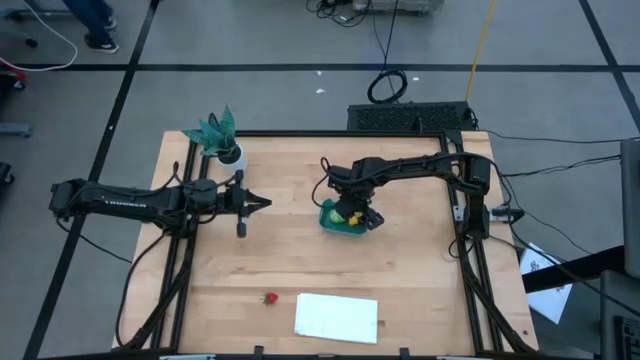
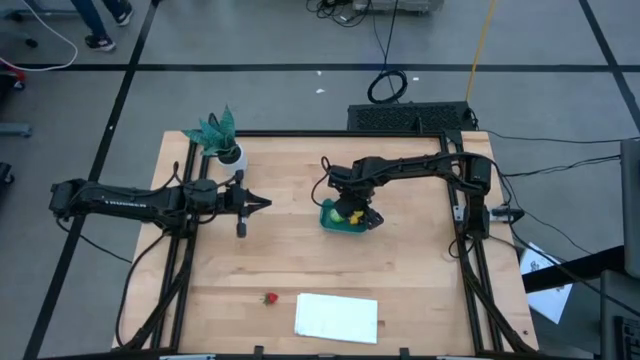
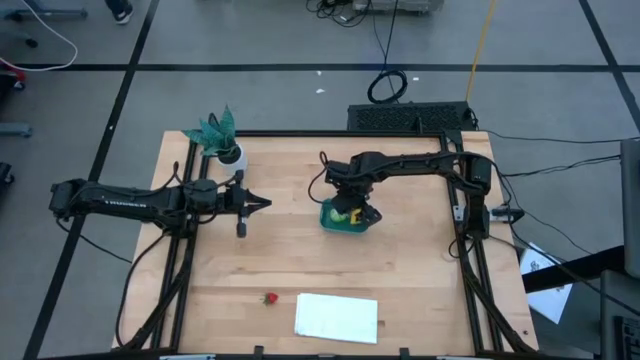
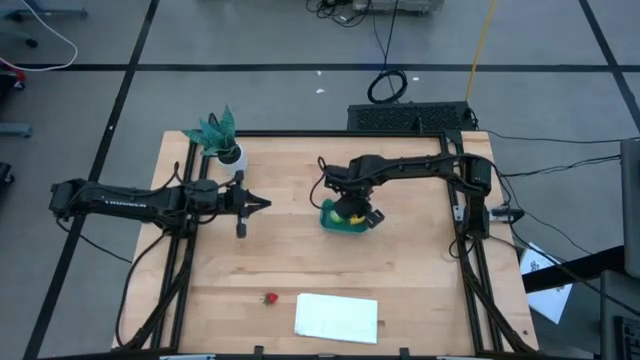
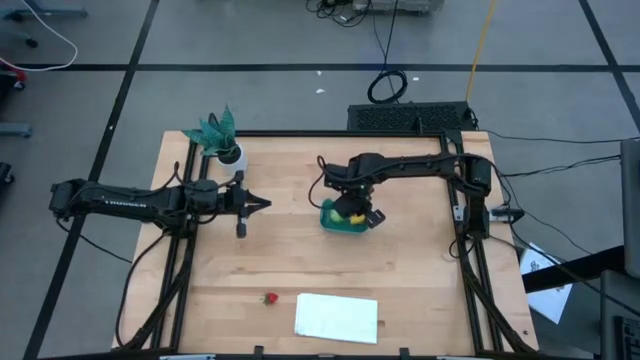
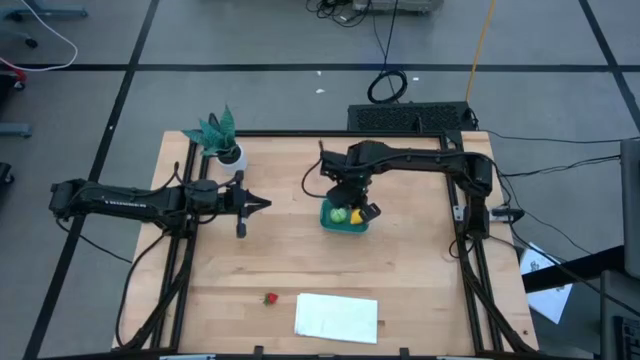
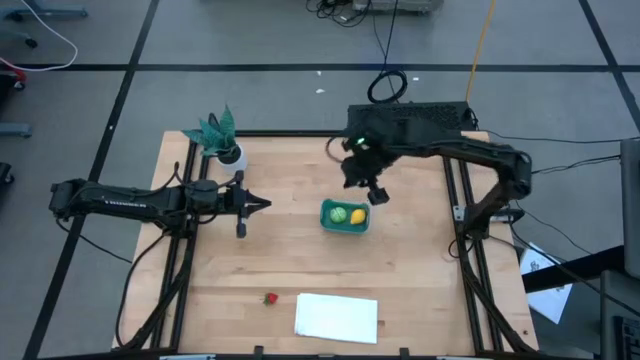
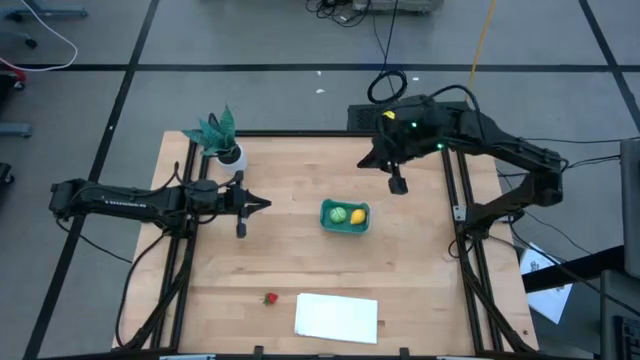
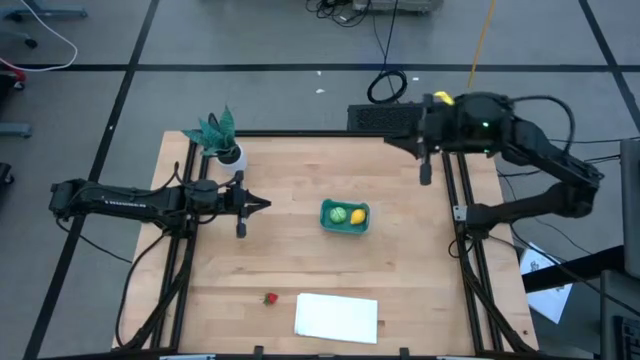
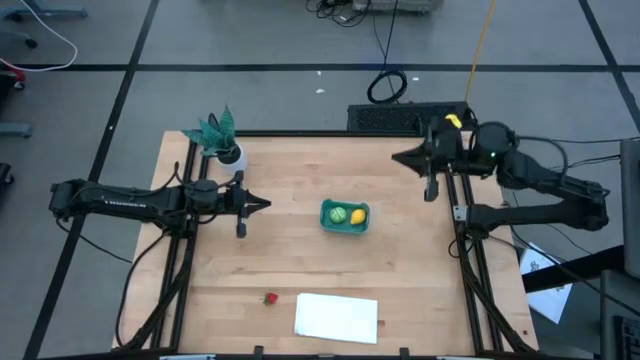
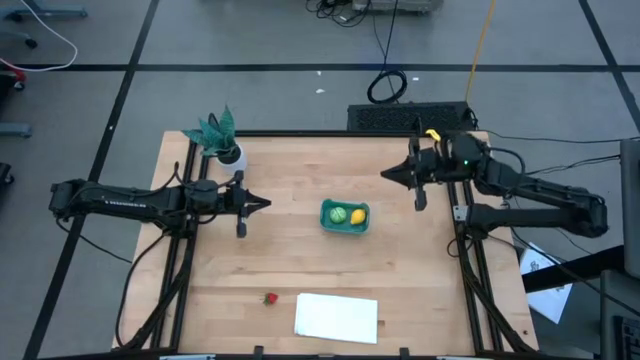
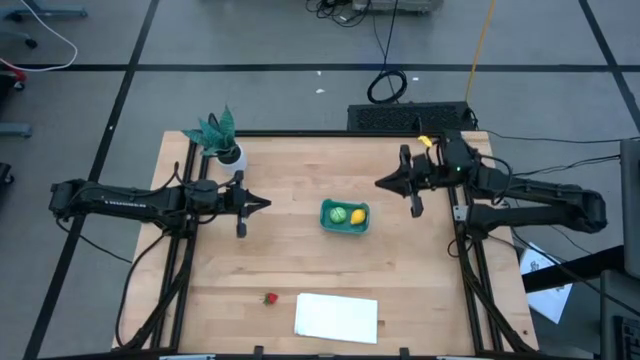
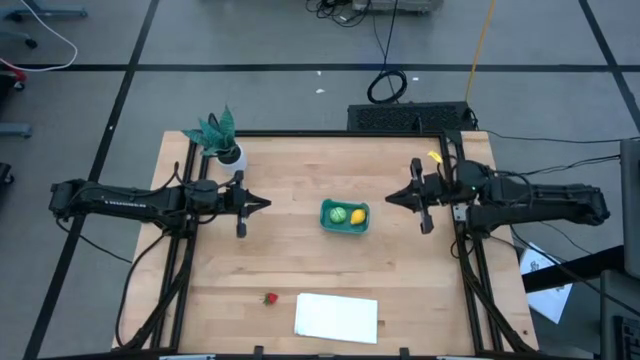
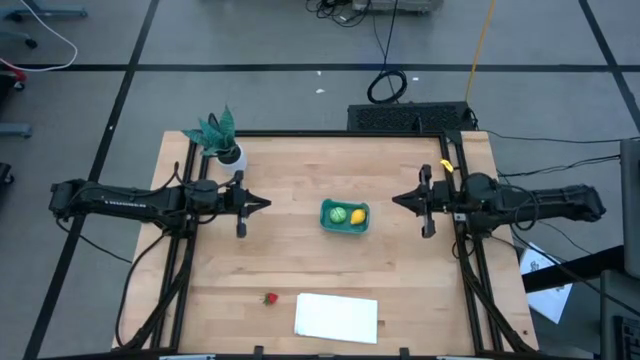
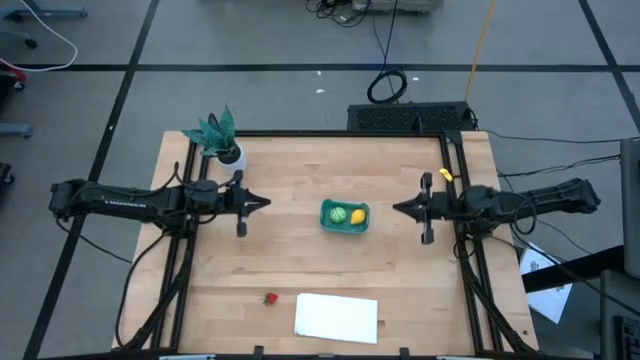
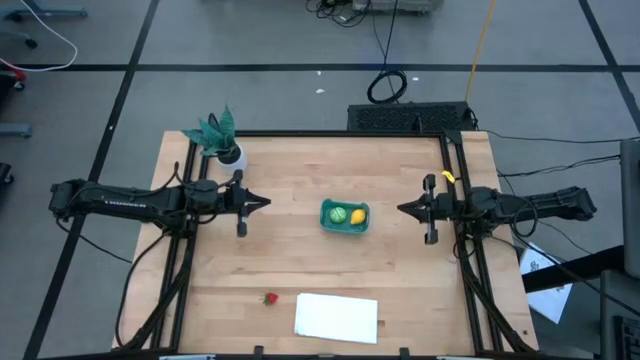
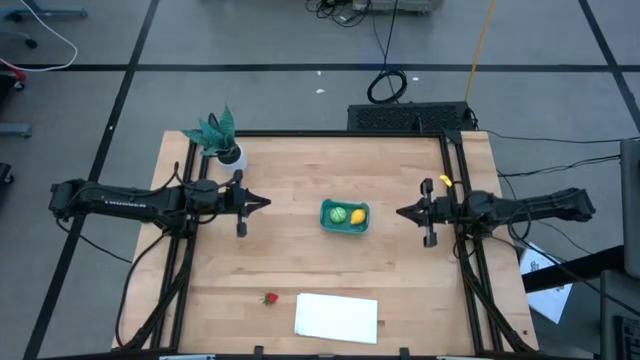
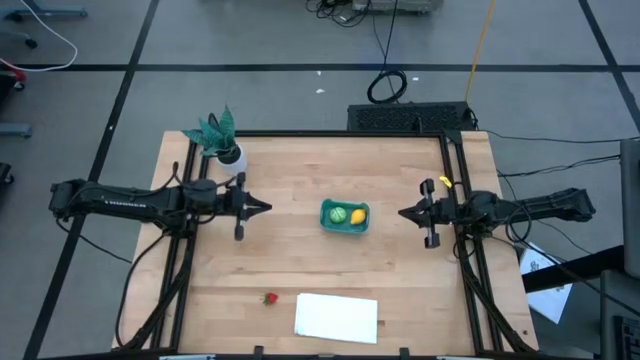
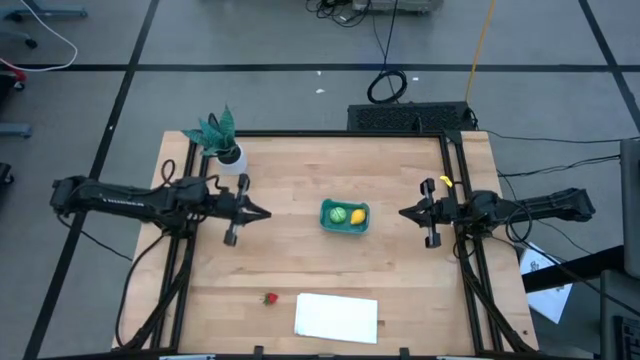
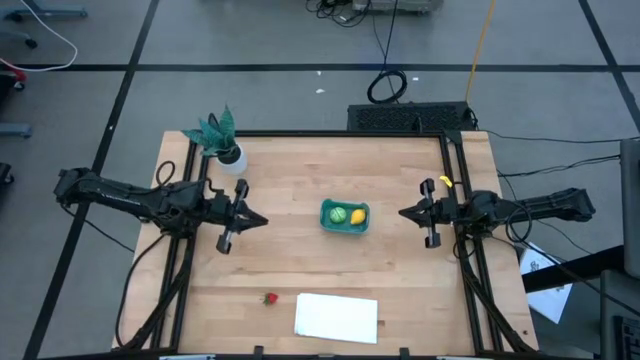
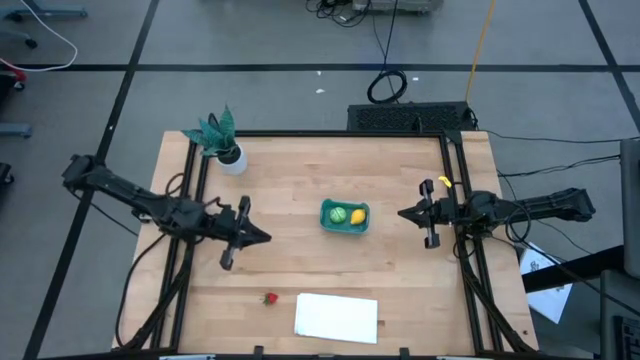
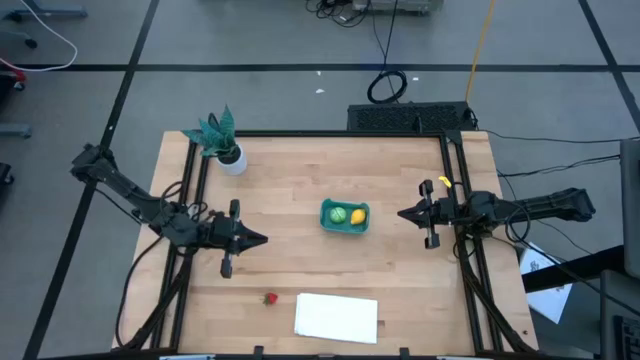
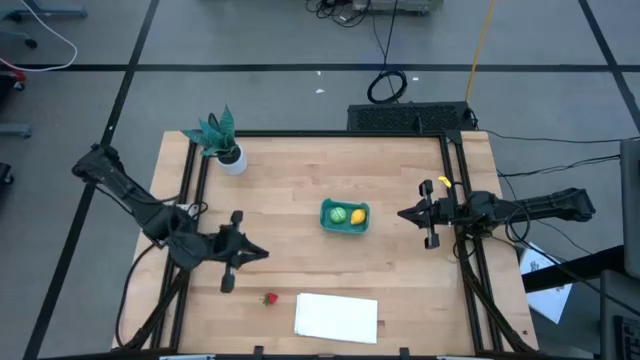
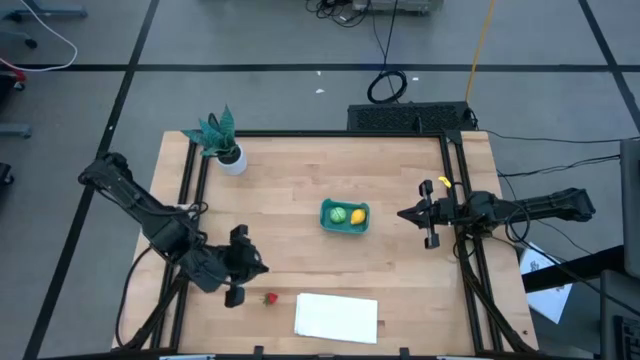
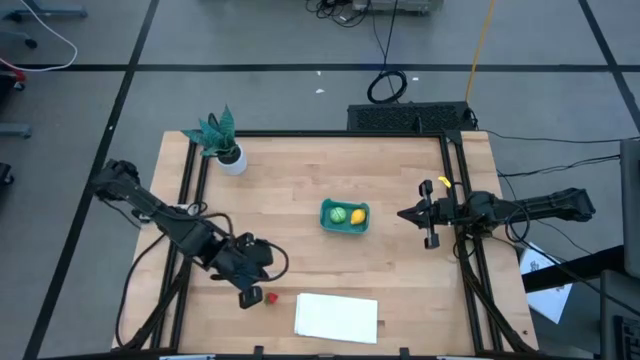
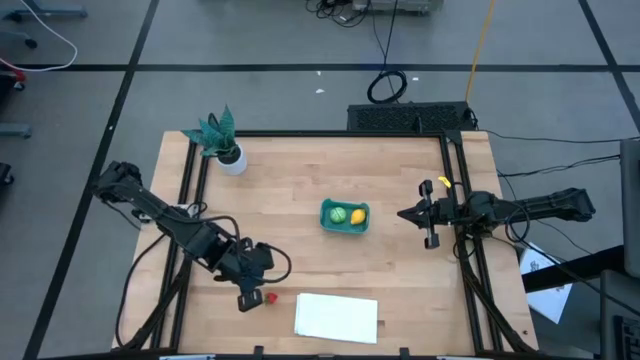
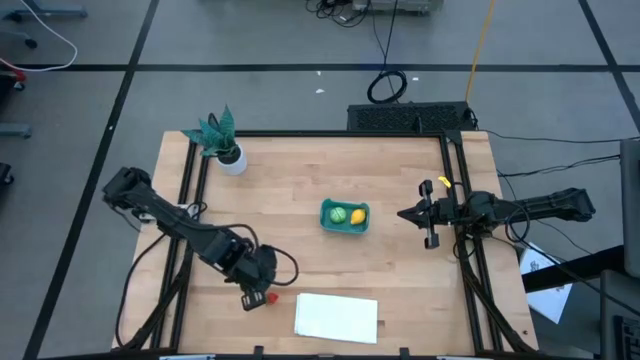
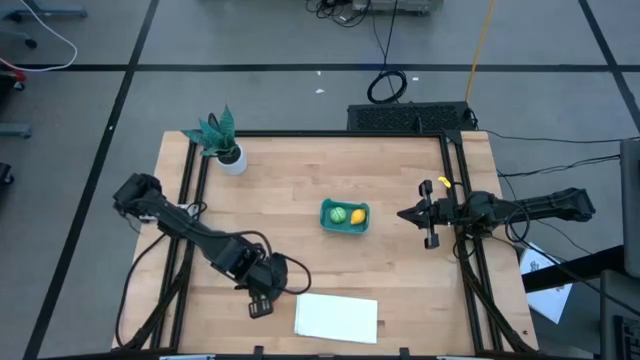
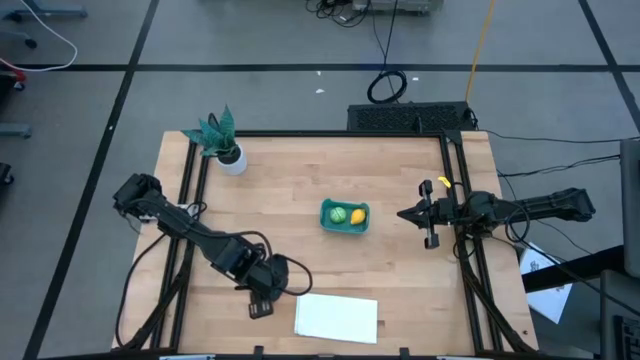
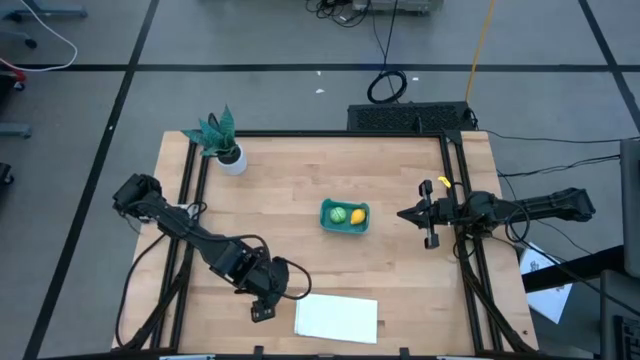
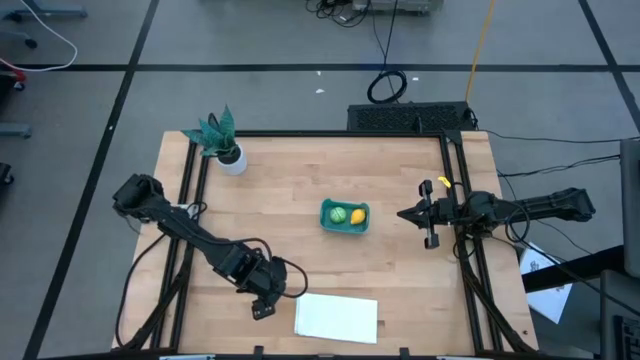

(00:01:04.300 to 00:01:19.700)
Task: Pick and placing Produce into tupperware
Put the strawberry into the bin

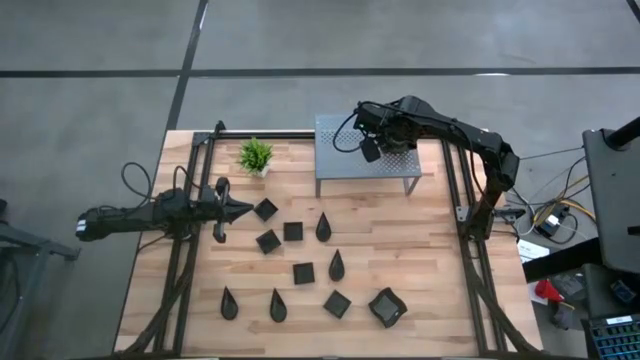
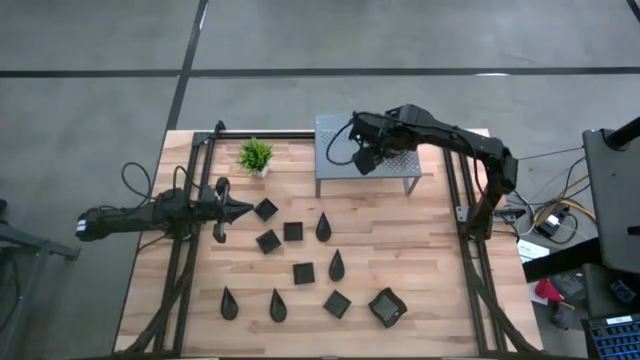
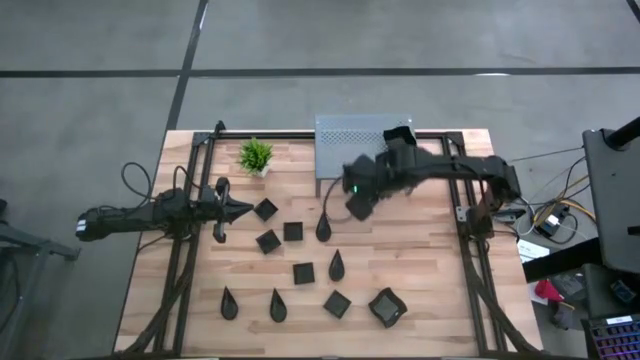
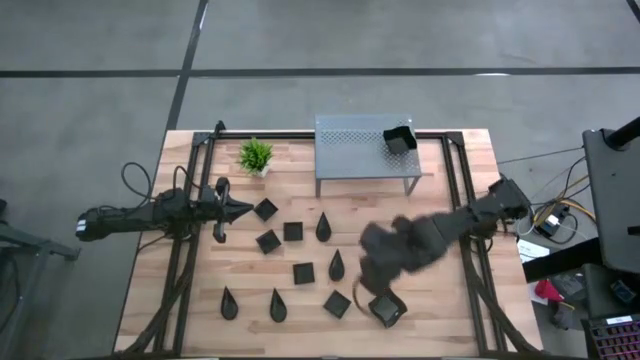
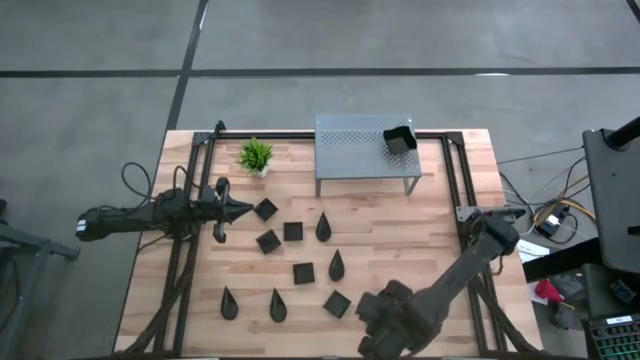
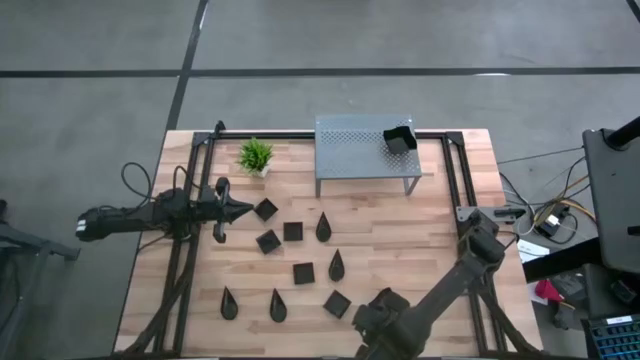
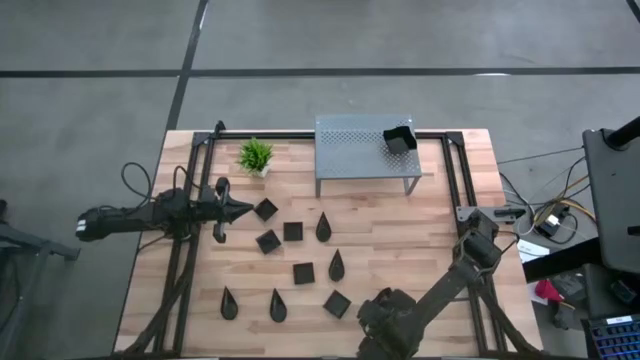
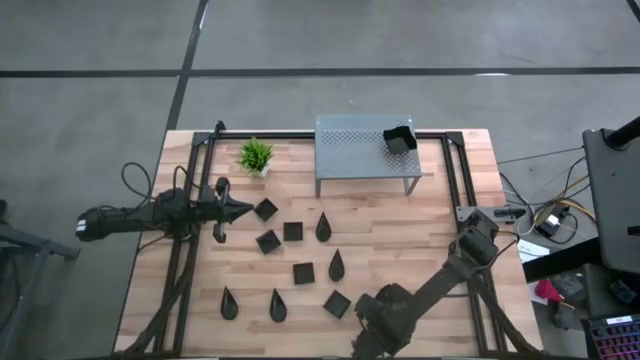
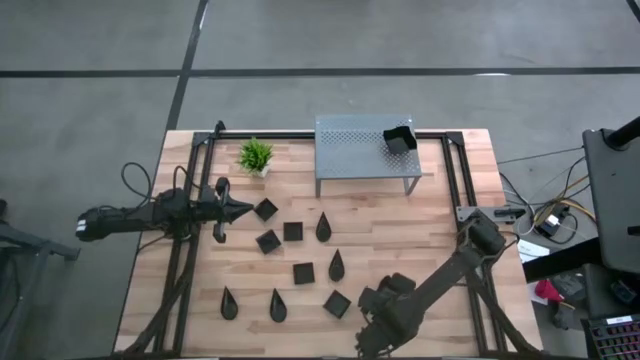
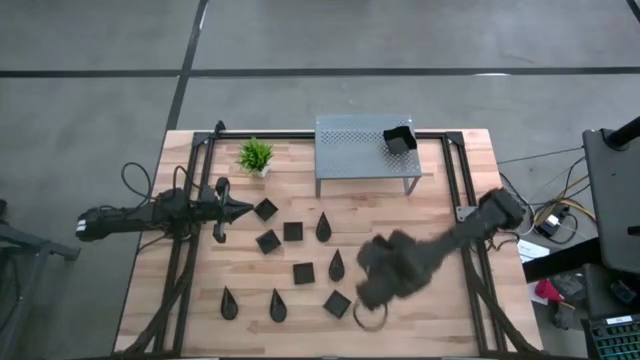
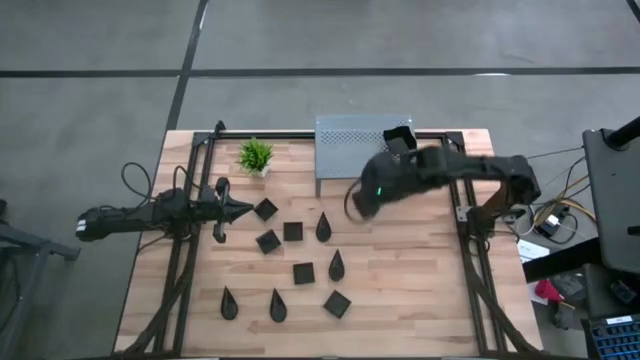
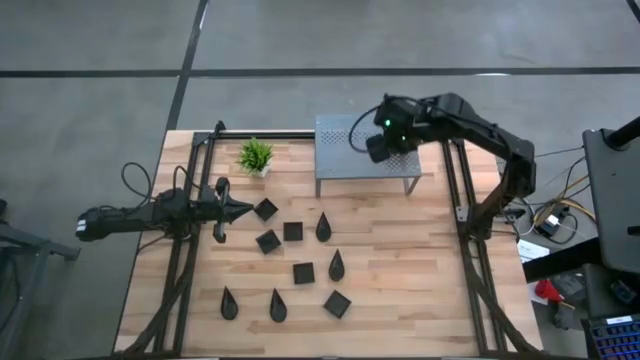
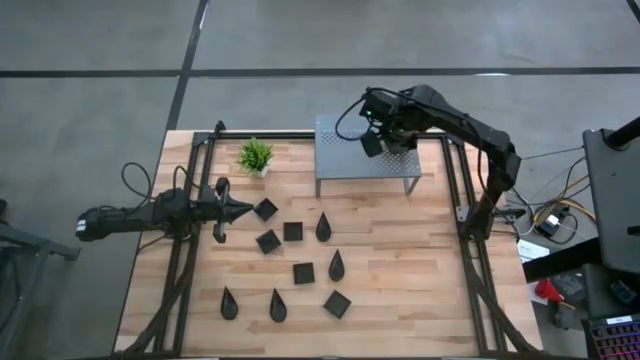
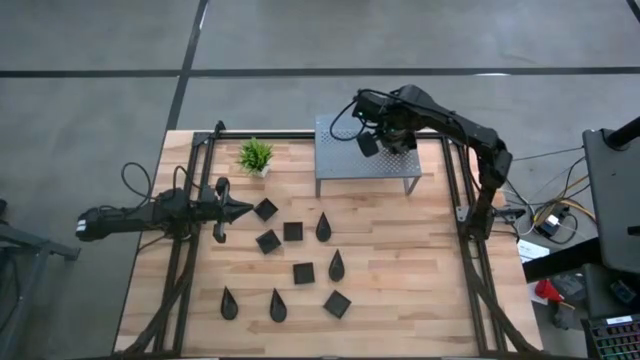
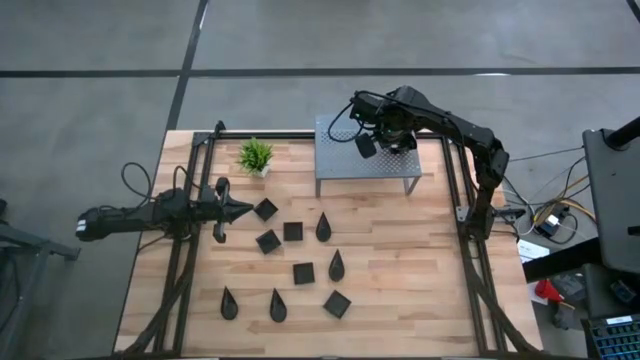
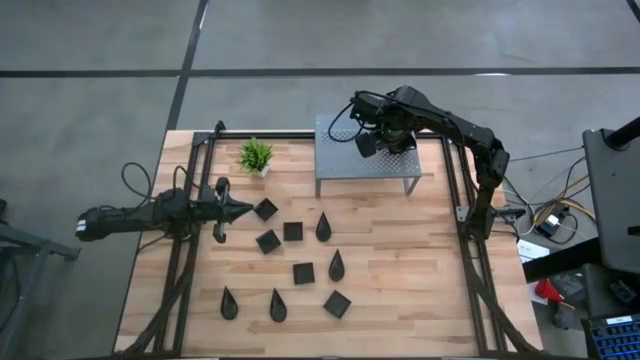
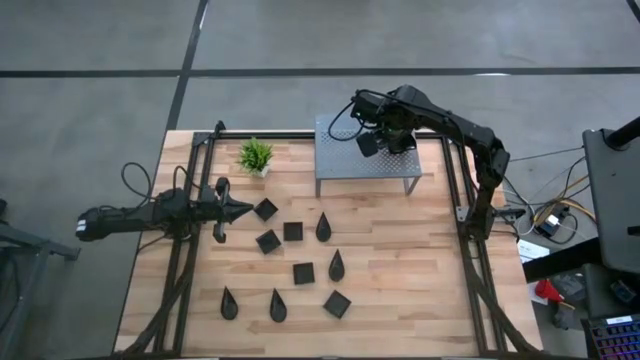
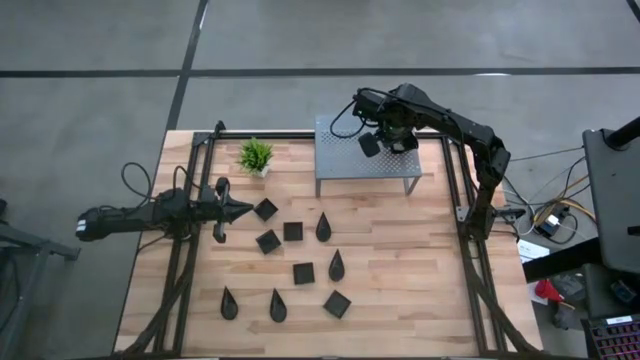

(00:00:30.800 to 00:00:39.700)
Task: Pick & Place Mini shaped plates
Stack the black distorted square plate on top of the black distorted square plate on the shelf
